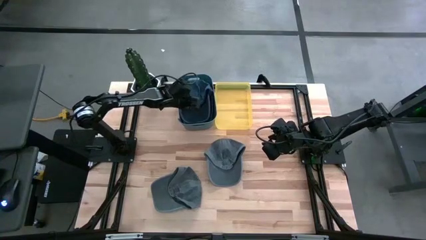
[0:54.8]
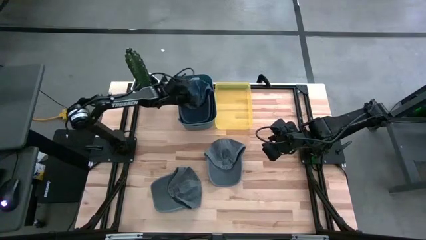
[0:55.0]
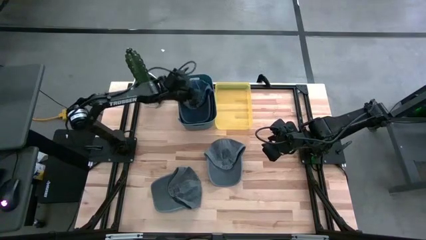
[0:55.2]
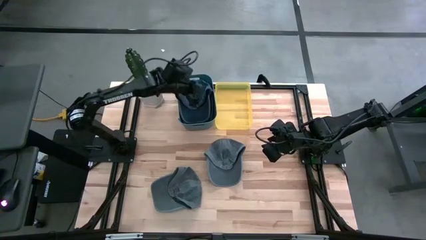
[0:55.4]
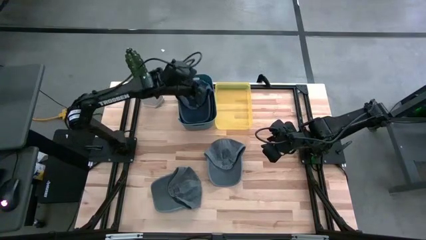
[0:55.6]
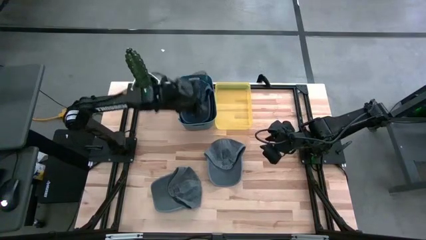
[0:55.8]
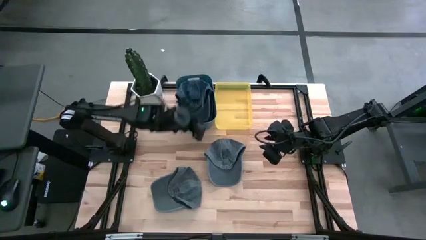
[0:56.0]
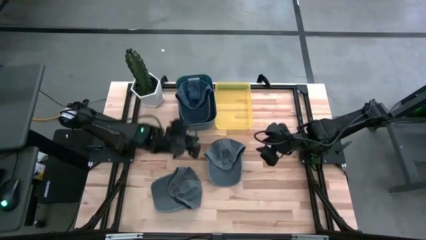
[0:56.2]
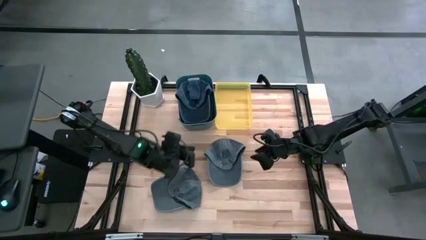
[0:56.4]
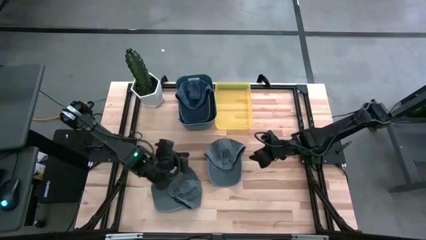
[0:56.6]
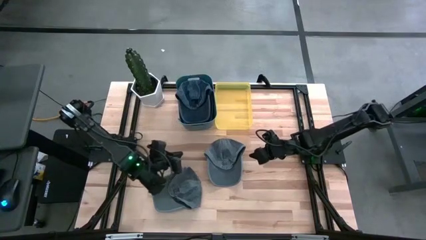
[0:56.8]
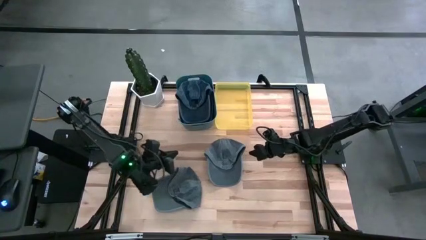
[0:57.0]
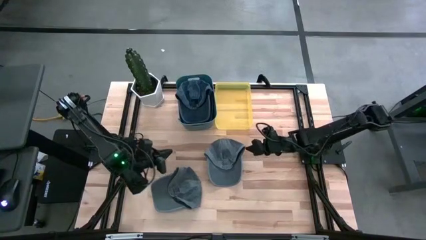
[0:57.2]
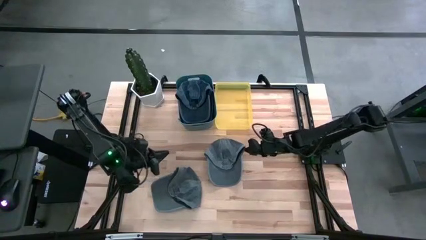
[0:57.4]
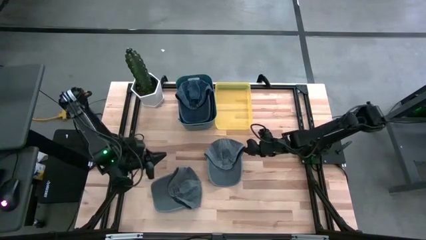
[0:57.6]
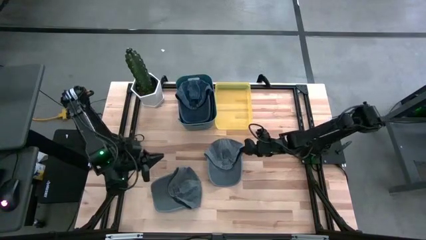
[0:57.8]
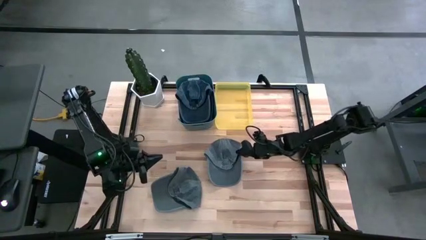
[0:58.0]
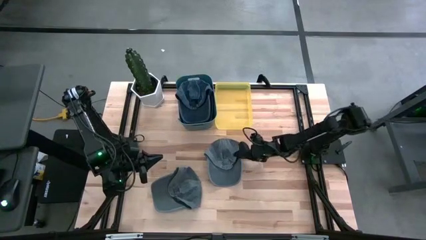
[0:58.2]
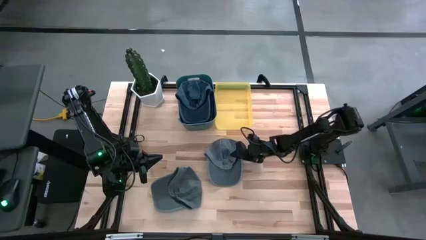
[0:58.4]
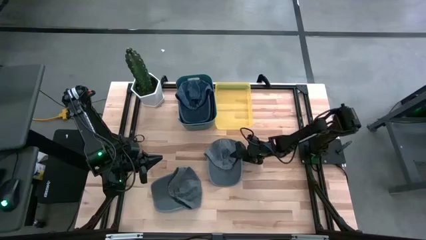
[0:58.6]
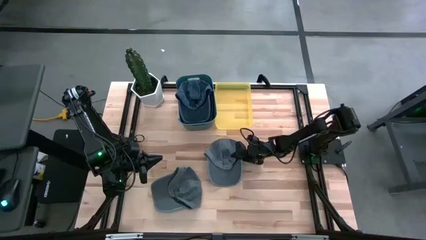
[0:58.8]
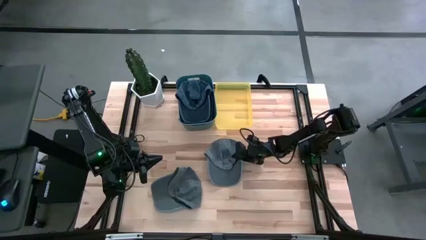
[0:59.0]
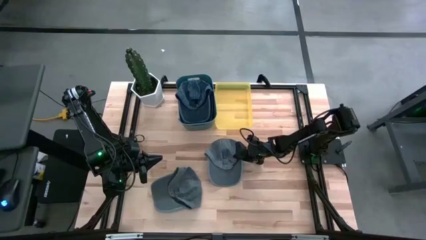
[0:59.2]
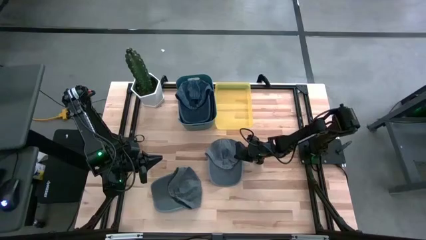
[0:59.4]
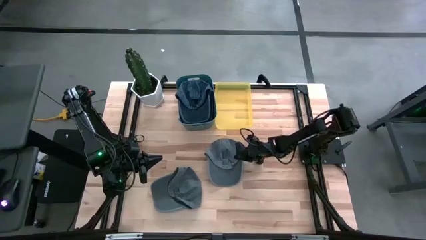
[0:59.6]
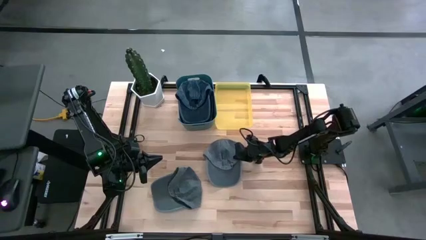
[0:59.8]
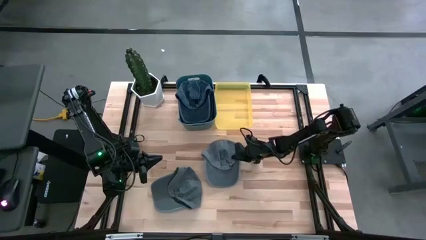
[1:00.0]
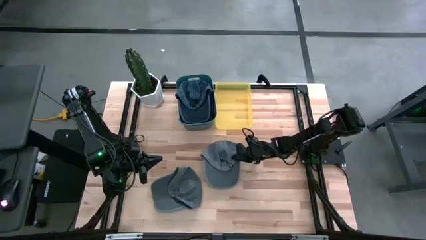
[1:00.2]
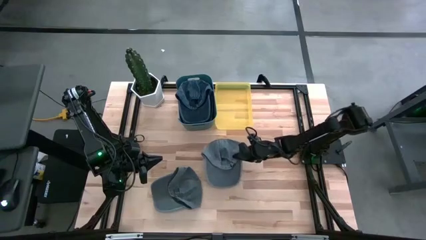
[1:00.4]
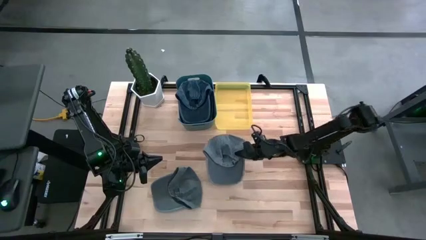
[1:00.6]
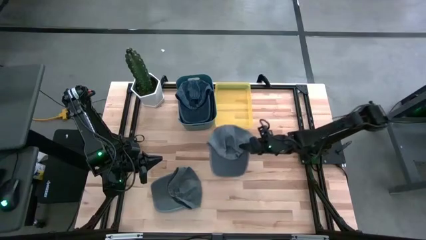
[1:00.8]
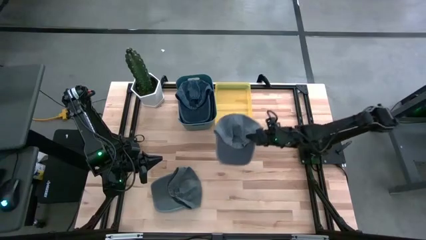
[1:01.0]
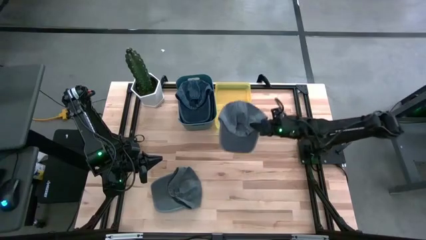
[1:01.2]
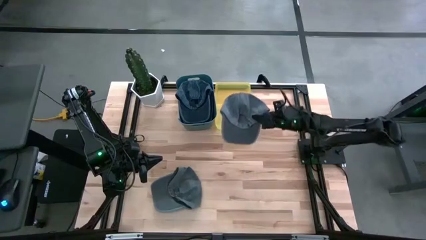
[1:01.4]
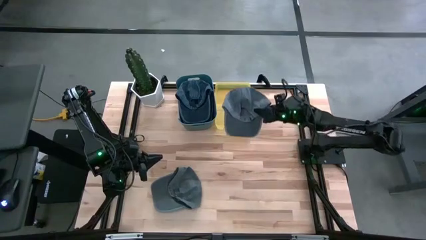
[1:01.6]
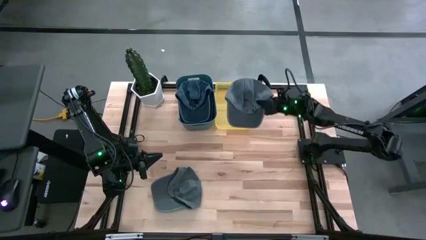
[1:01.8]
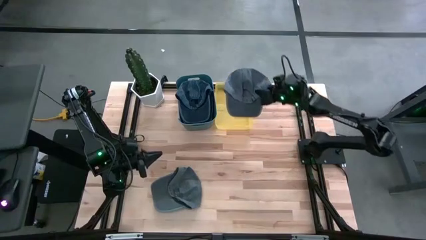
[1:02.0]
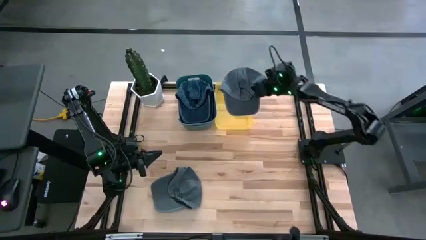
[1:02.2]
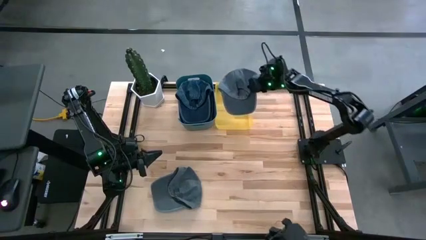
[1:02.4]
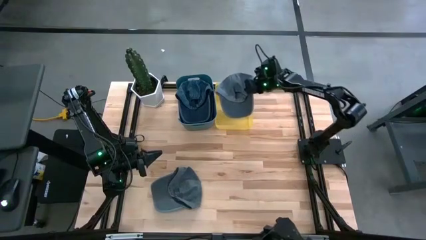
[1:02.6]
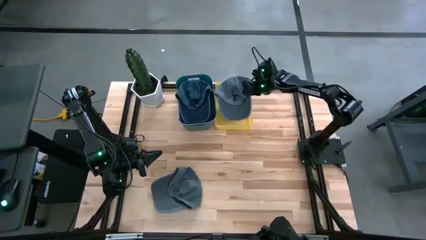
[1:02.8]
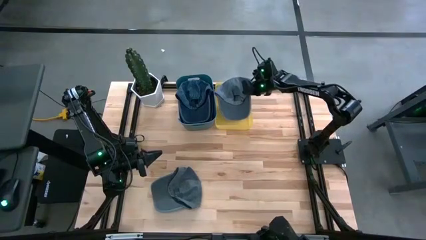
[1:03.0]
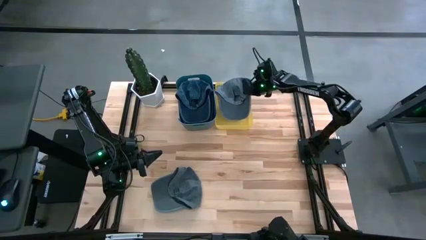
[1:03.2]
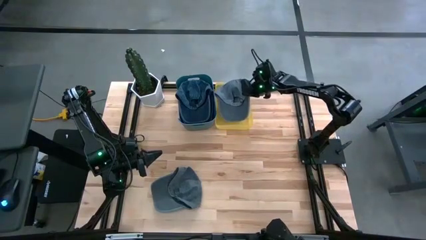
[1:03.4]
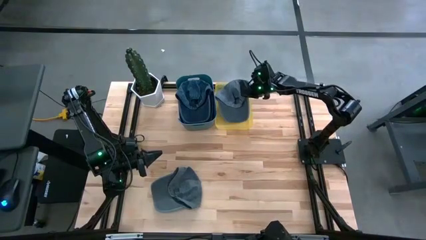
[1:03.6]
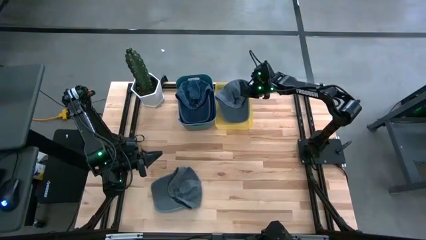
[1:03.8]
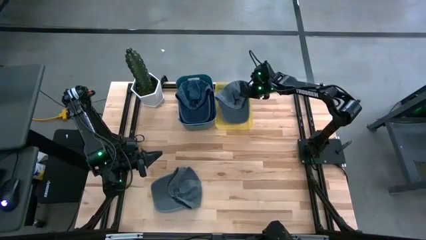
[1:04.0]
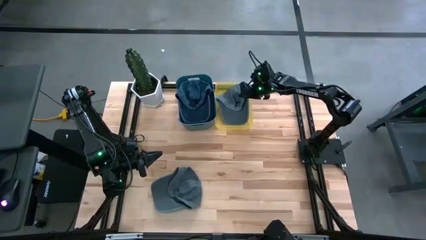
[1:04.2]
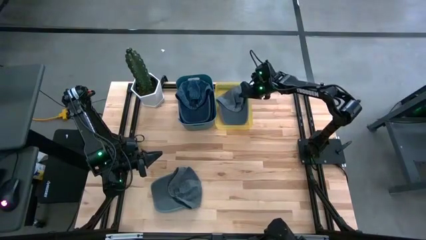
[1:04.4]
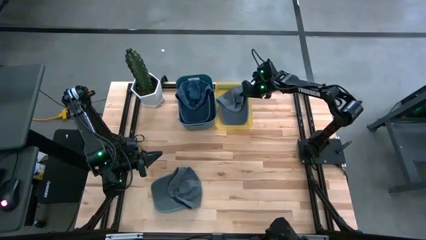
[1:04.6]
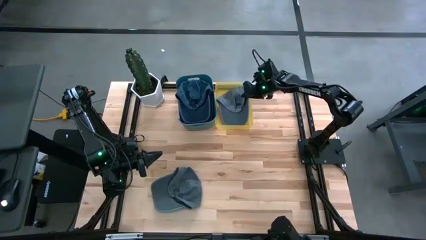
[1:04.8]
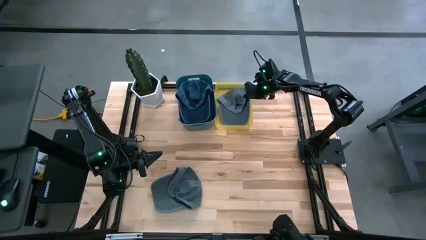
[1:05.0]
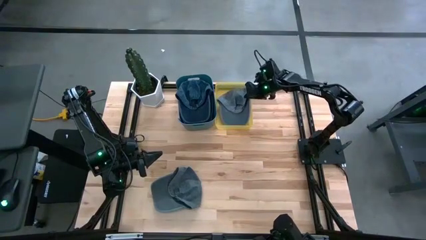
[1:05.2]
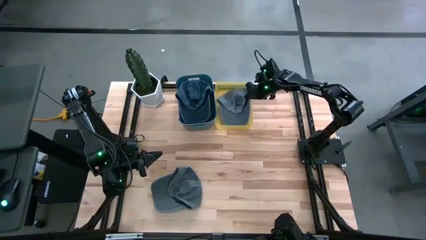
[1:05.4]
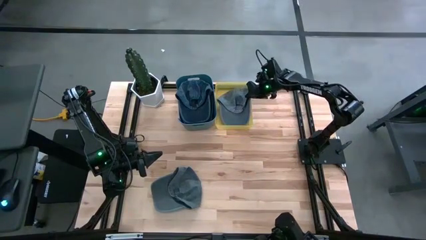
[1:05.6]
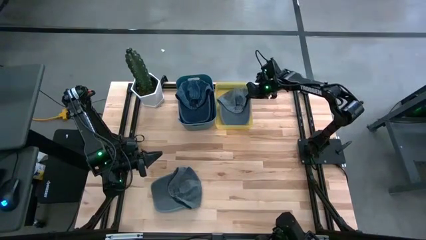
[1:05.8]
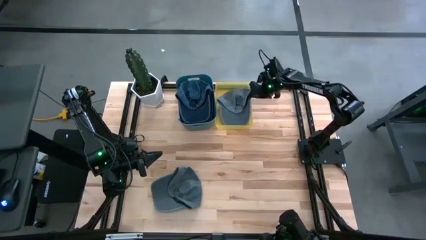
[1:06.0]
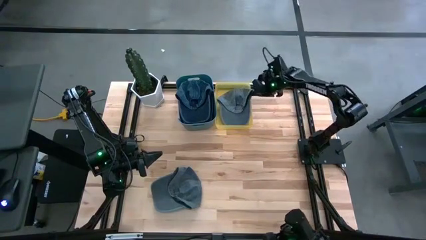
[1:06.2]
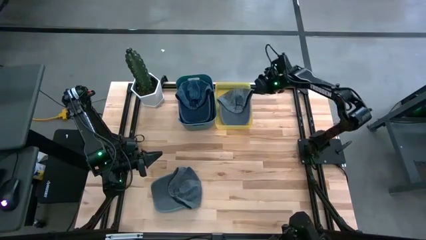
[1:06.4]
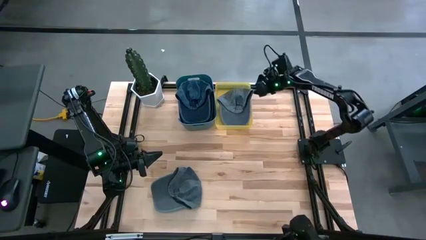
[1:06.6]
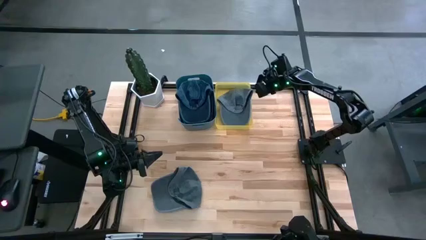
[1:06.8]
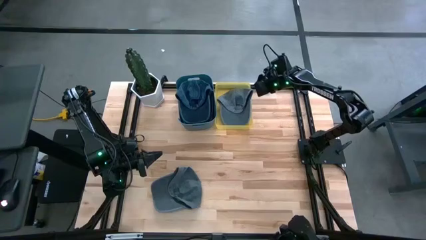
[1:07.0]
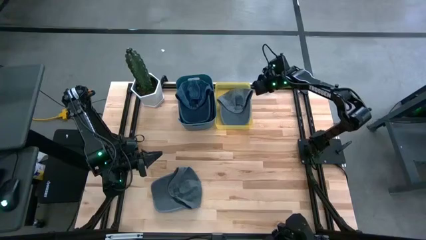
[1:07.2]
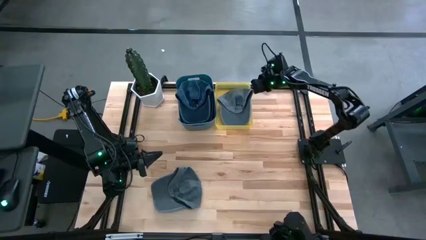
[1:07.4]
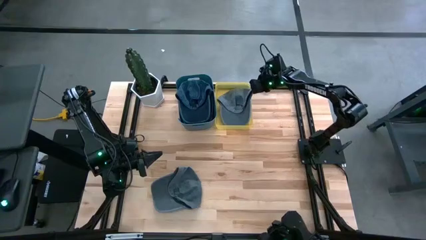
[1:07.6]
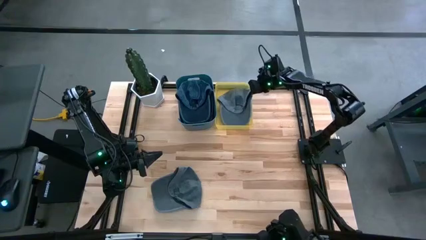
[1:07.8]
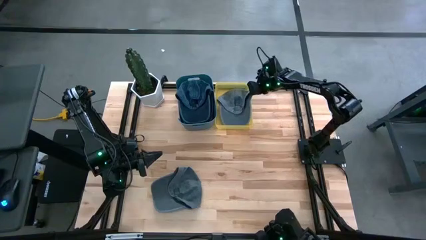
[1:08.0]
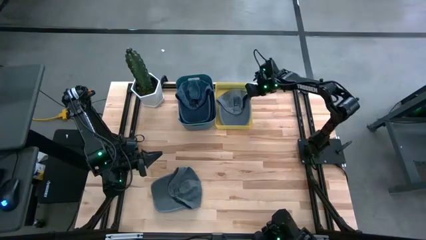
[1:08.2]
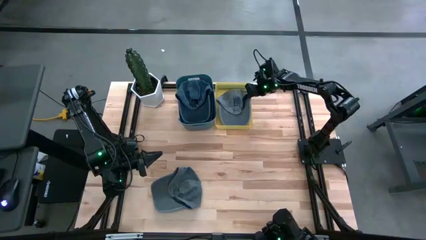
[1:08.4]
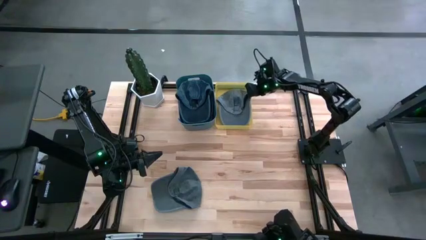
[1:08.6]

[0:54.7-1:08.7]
Task: Pick & Place hat
Put the top gray cap into the yellow bin

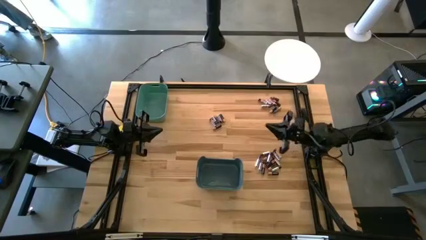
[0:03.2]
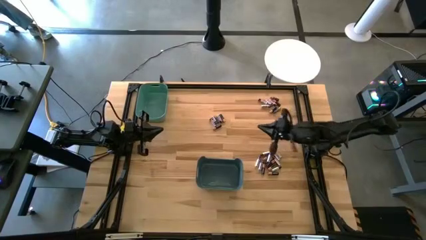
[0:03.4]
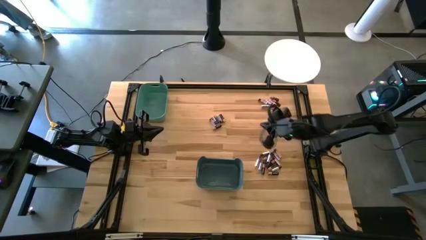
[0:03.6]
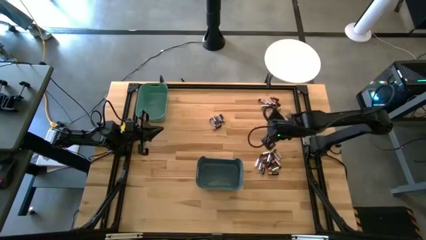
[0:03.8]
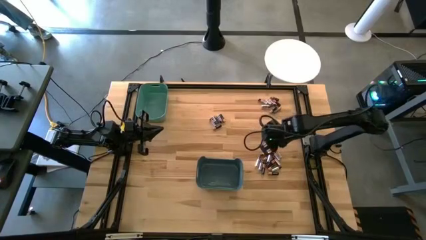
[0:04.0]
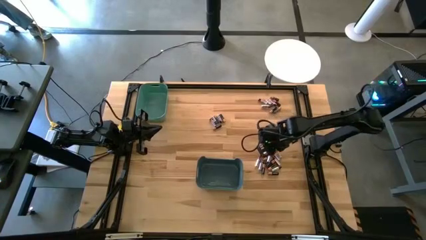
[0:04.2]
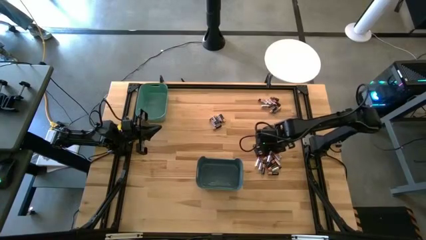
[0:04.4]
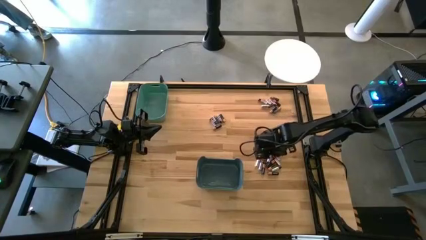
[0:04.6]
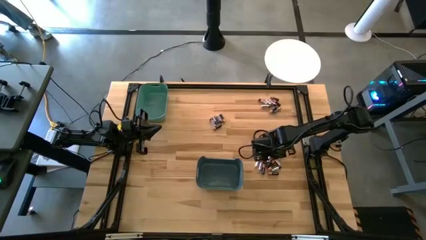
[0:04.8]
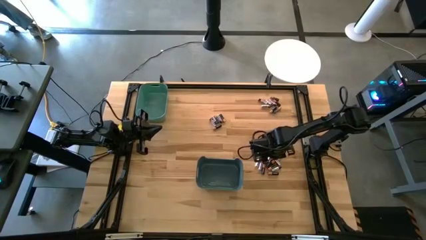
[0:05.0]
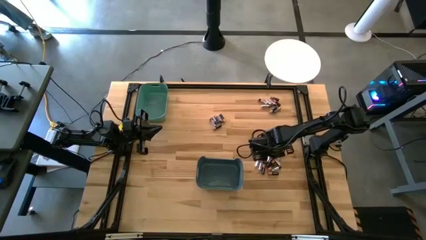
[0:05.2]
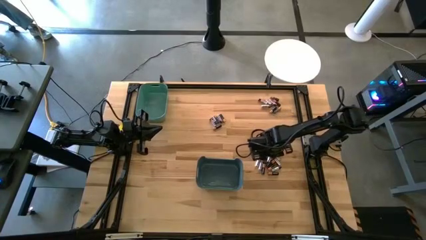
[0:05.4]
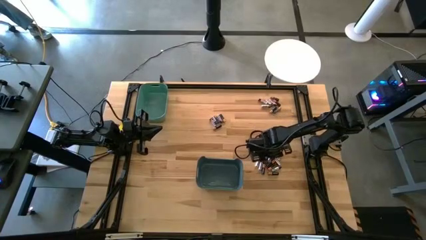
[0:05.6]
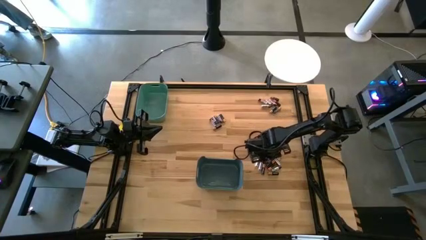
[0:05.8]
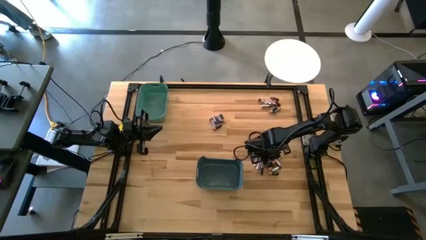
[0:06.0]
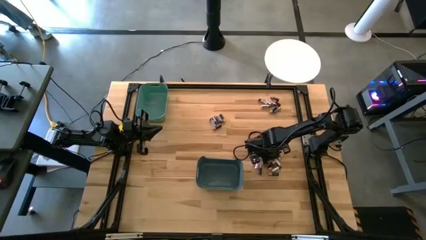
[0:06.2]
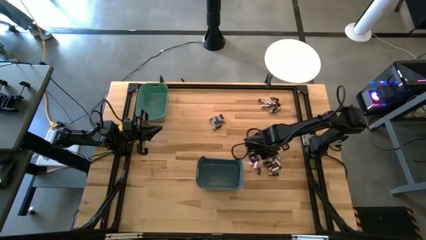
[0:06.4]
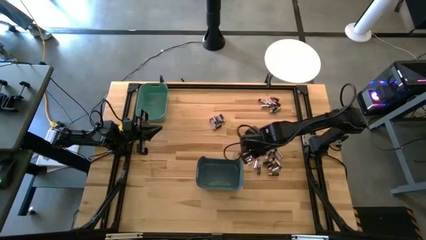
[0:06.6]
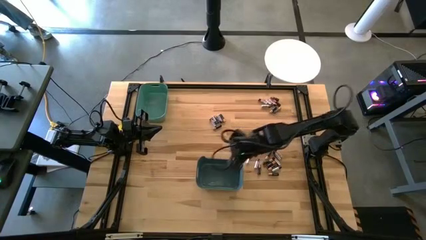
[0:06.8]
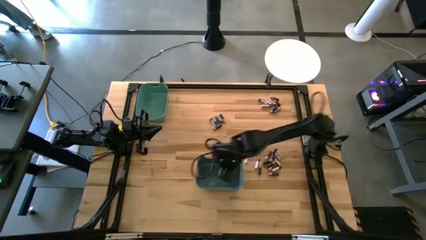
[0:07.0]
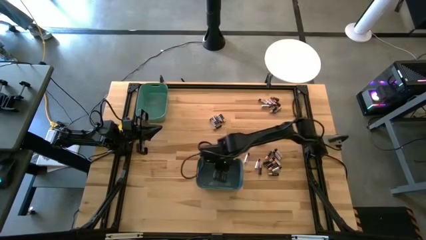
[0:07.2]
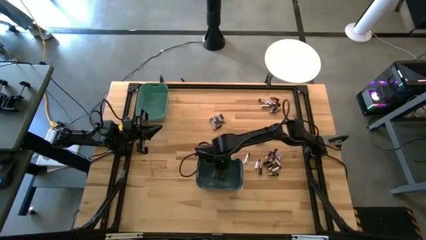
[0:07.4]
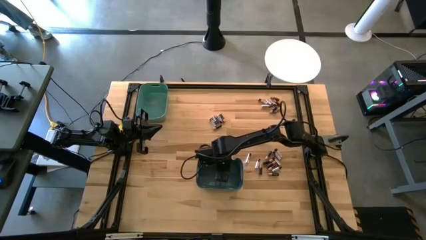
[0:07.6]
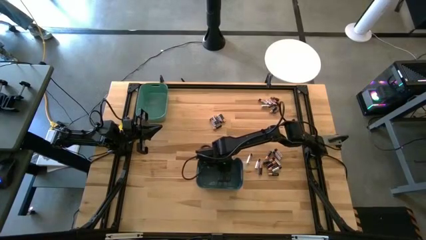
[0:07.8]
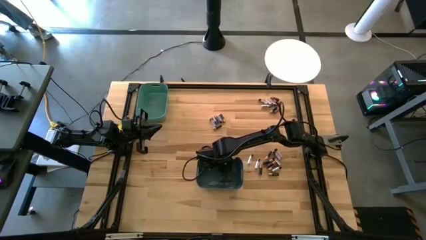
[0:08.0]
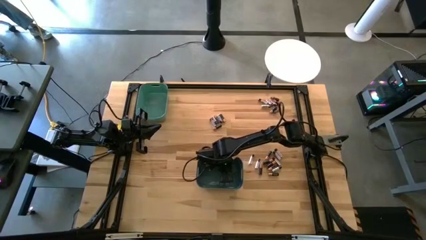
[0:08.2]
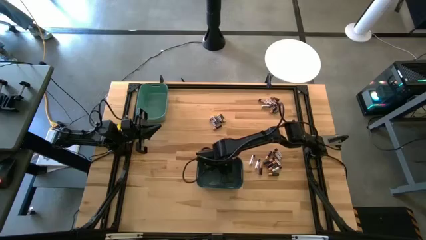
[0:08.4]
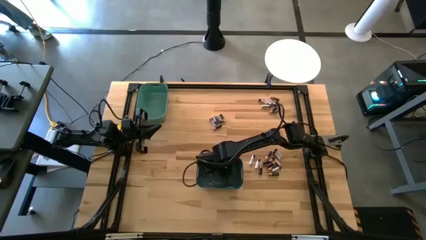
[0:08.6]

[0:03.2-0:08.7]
Task: Sort batteries
Put the silver battery into the blue bin
